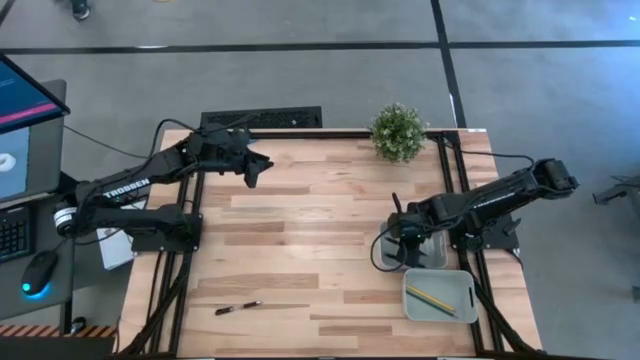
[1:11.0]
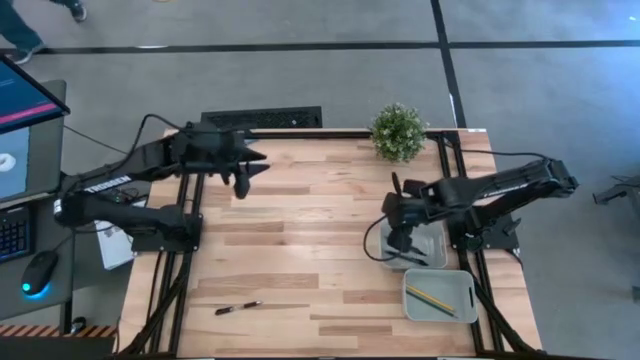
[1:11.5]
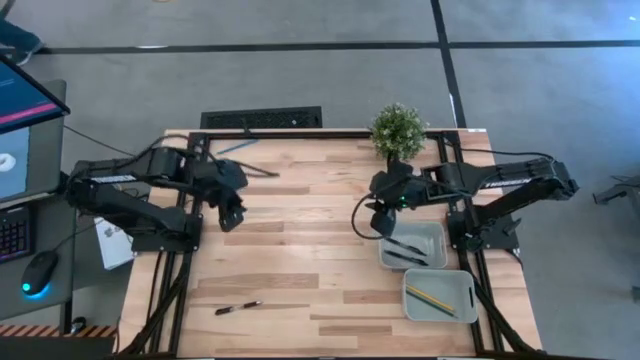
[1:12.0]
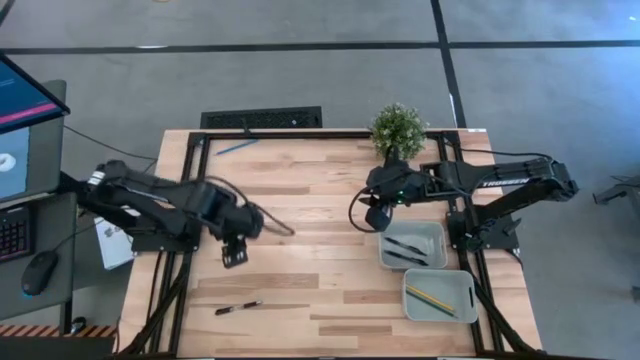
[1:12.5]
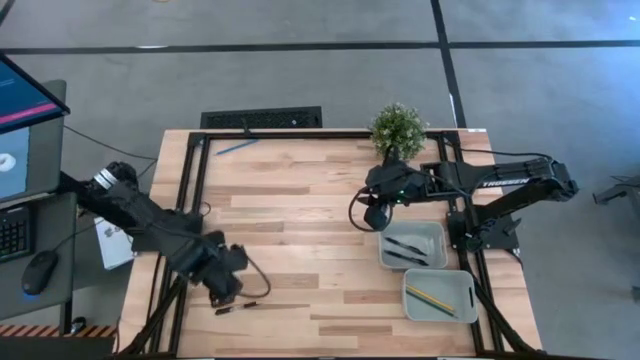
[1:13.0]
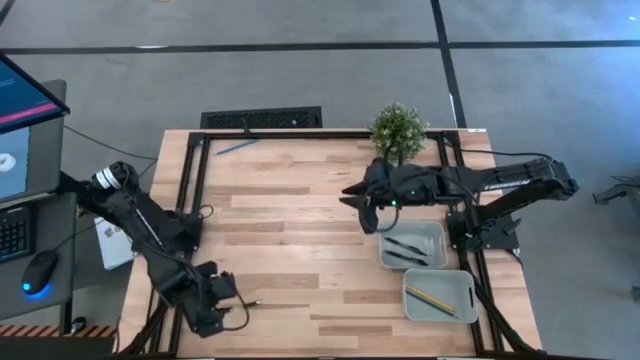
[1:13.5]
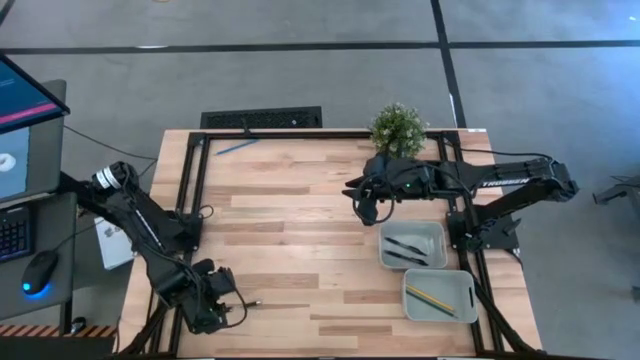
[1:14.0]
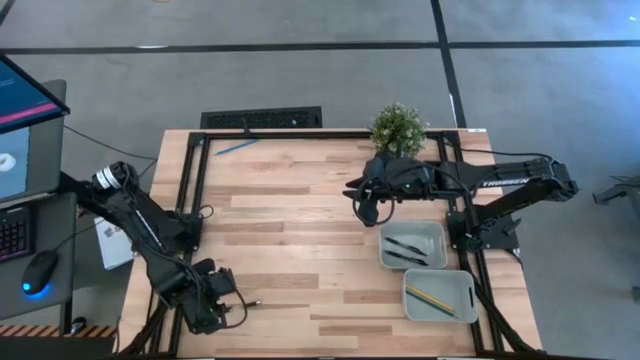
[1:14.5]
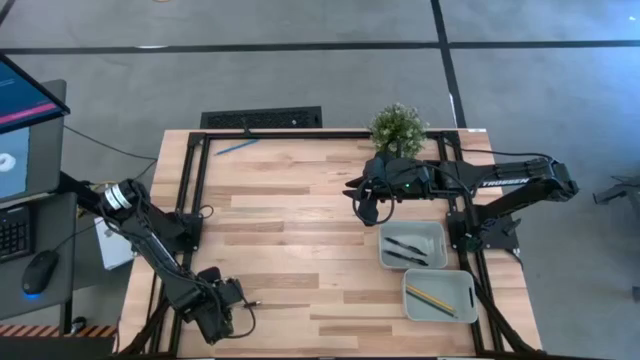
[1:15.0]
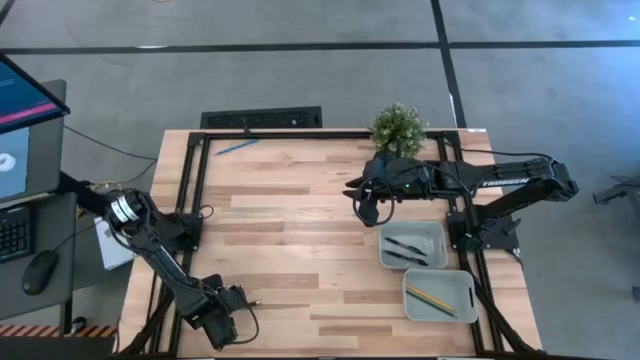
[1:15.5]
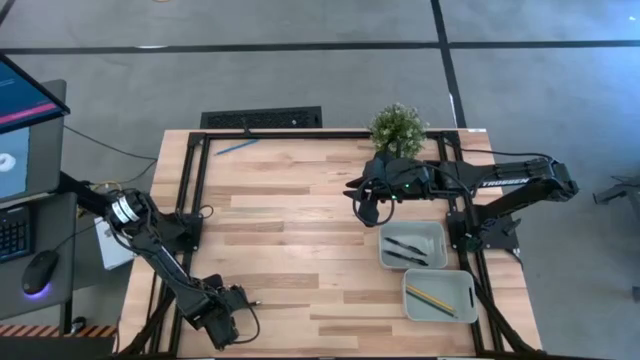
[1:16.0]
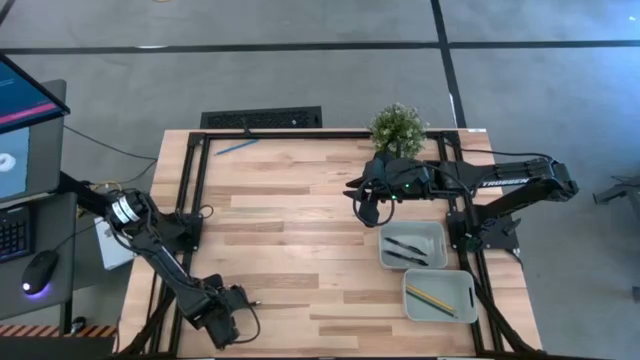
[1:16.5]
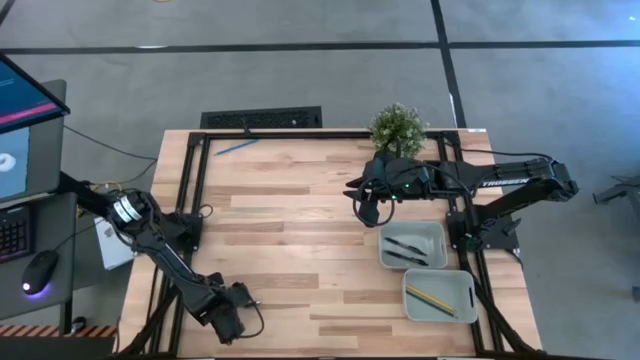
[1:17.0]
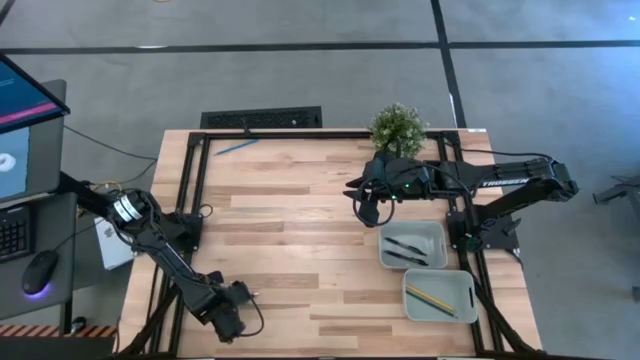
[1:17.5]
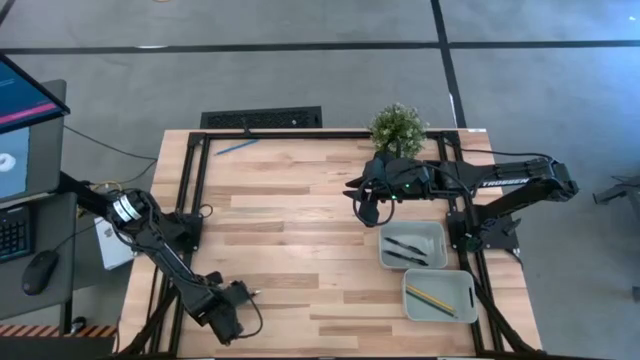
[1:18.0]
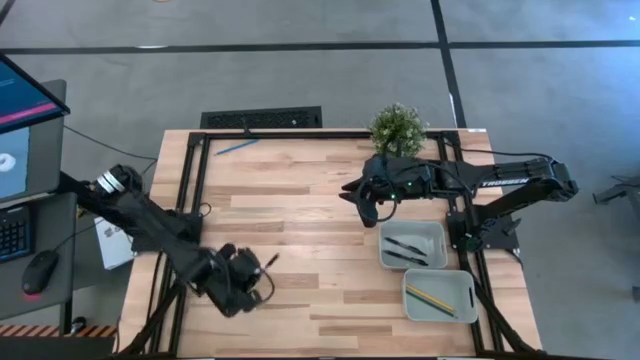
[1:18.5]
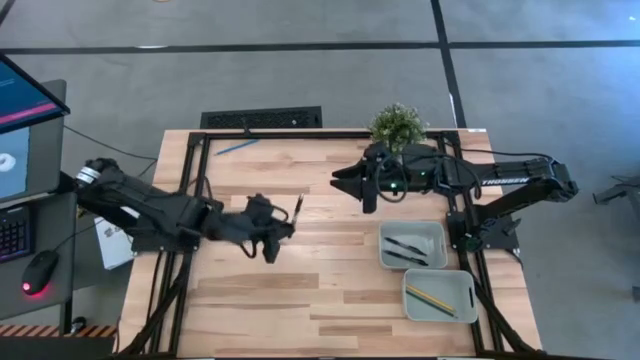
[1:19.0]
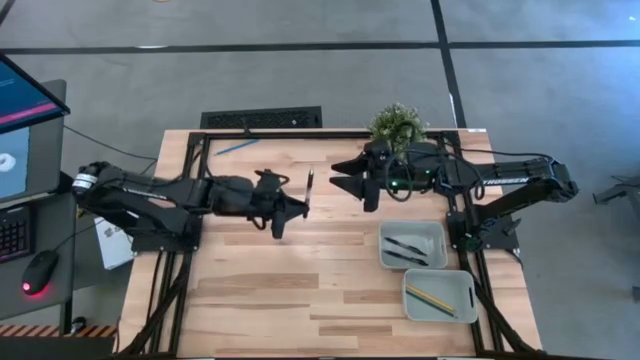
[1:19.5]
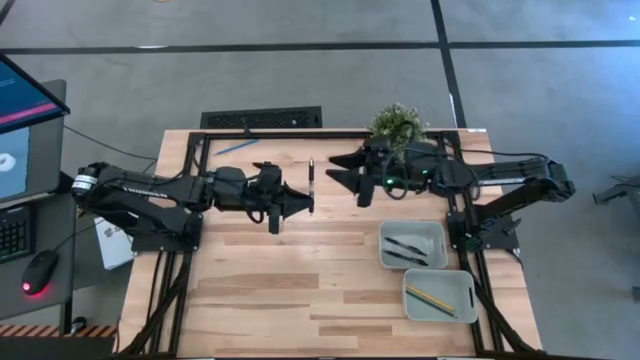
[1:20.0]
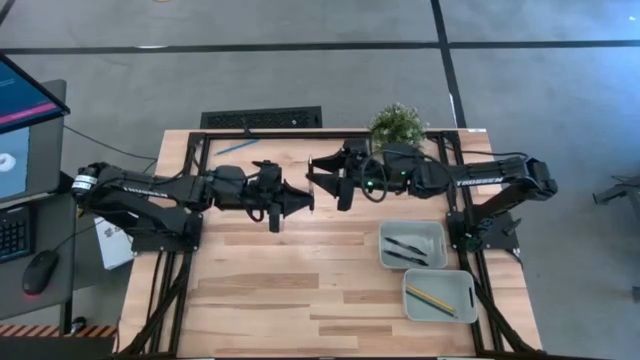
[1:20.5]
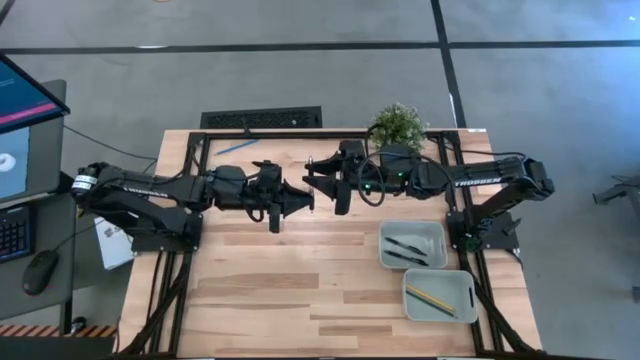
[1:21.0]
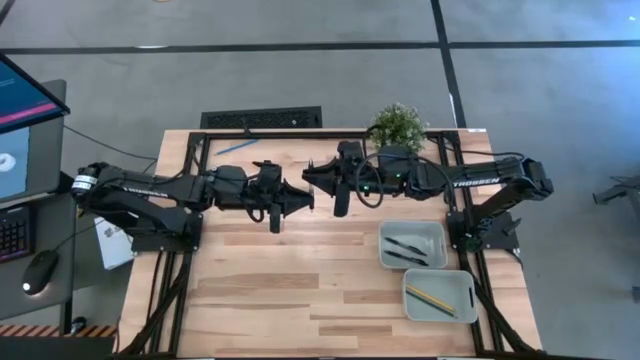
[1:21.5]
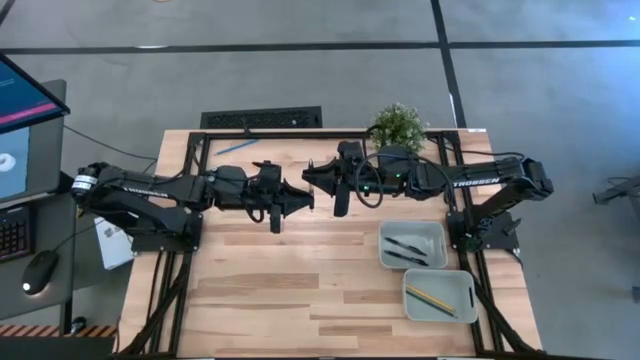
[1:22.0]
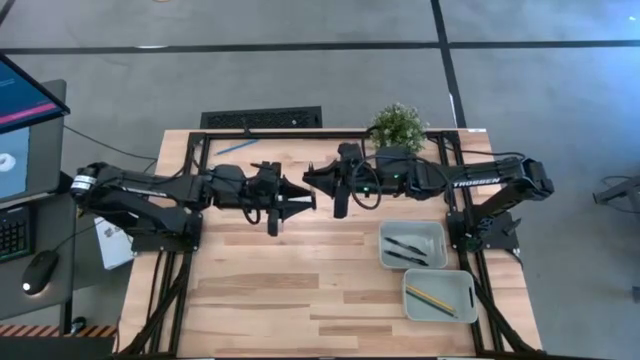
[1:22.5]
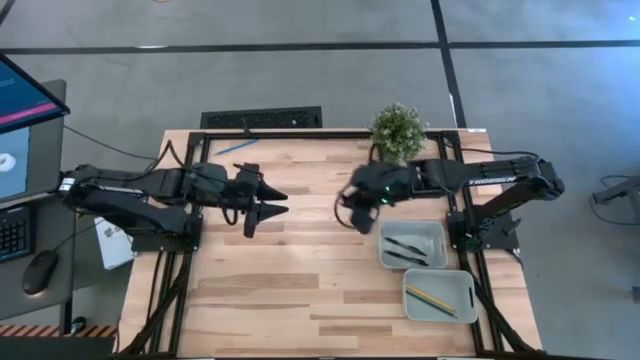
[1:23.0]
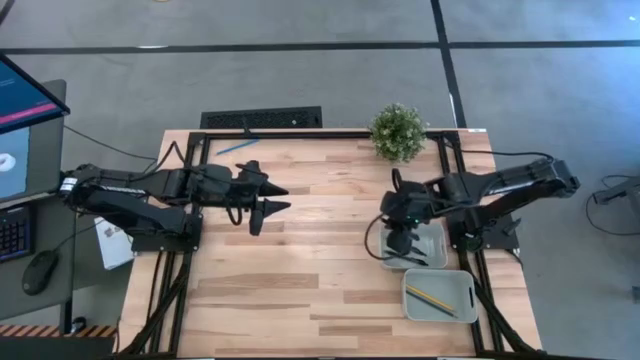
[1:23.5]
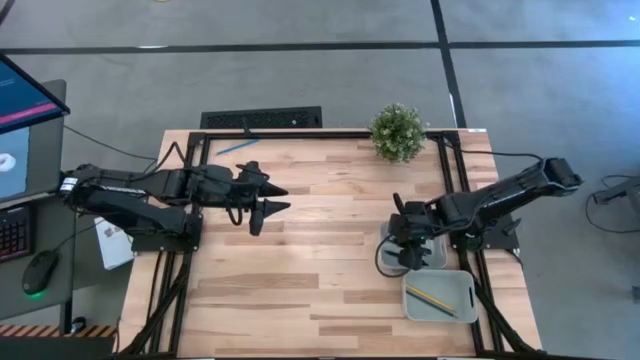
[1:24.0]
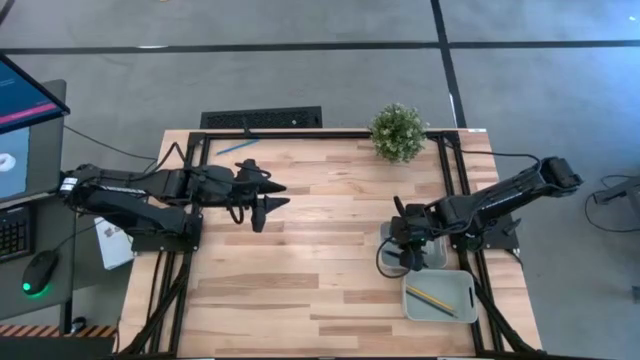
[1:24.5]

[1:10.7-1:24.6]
Task: Sort pens & pencils
Put the black pen into the top gray bin

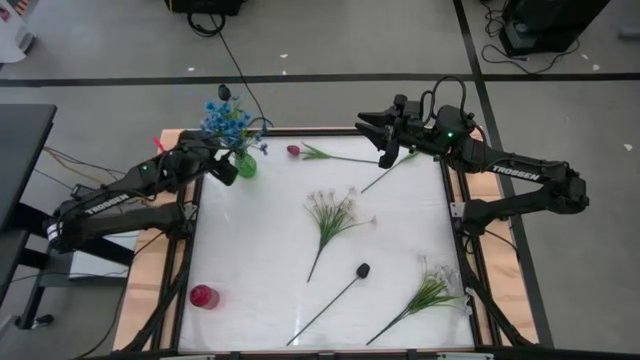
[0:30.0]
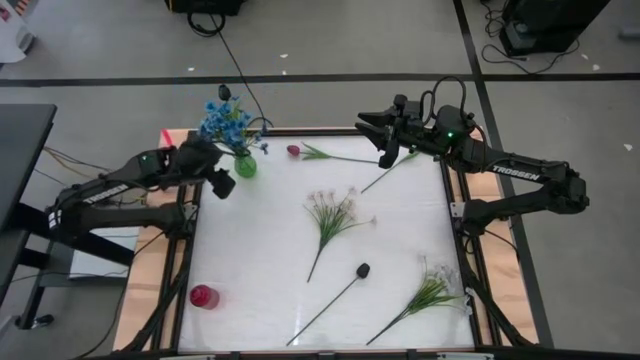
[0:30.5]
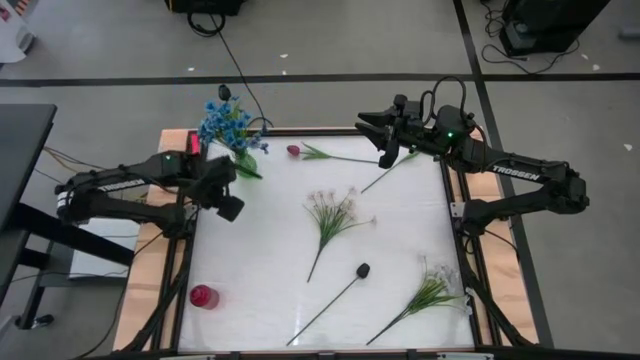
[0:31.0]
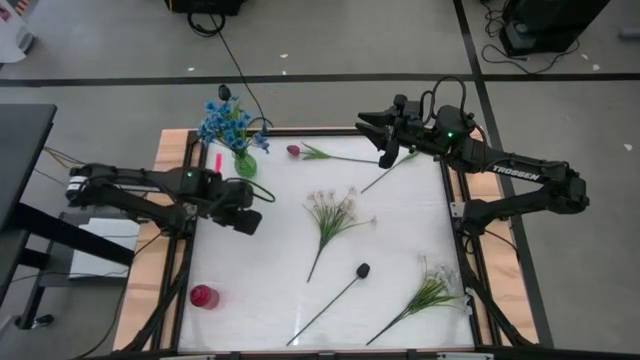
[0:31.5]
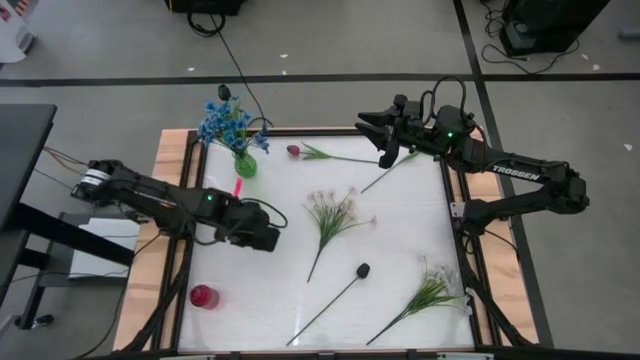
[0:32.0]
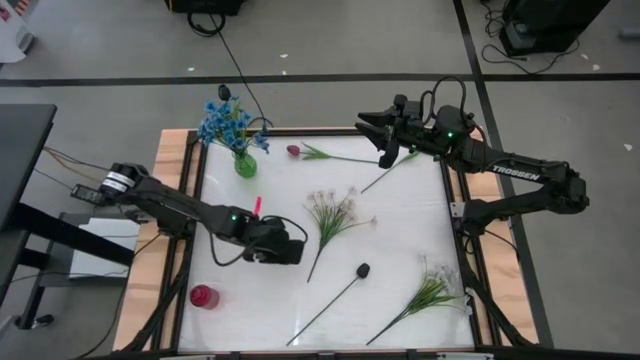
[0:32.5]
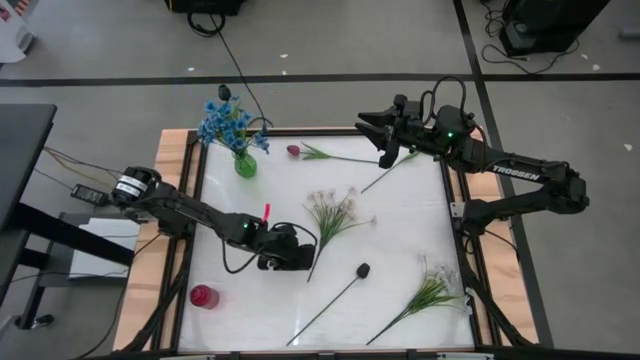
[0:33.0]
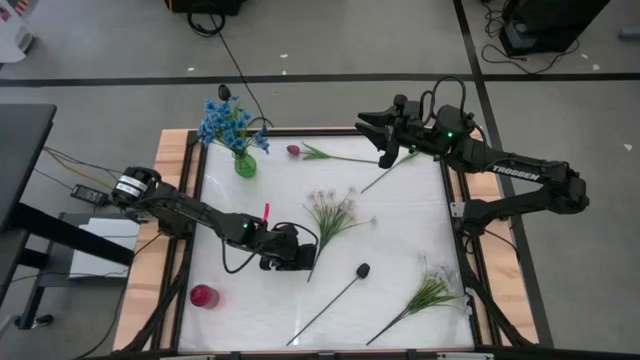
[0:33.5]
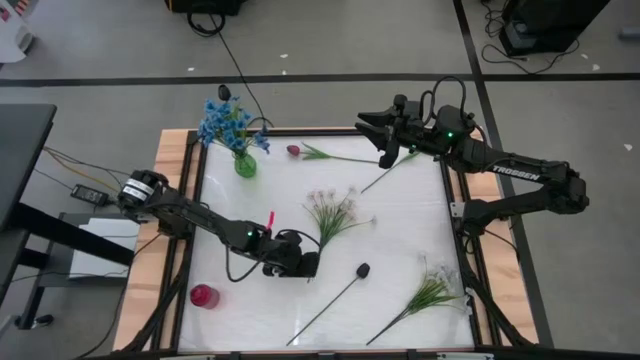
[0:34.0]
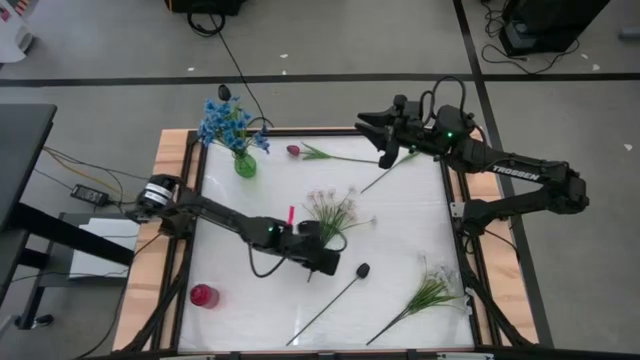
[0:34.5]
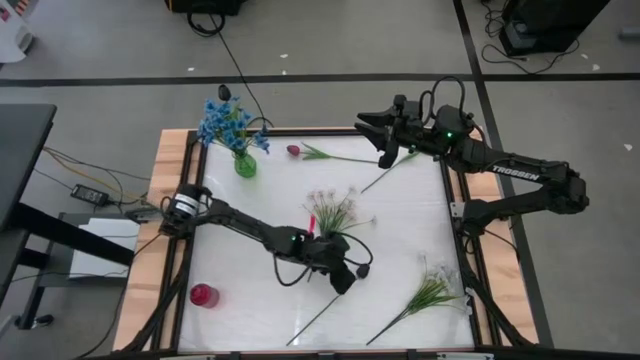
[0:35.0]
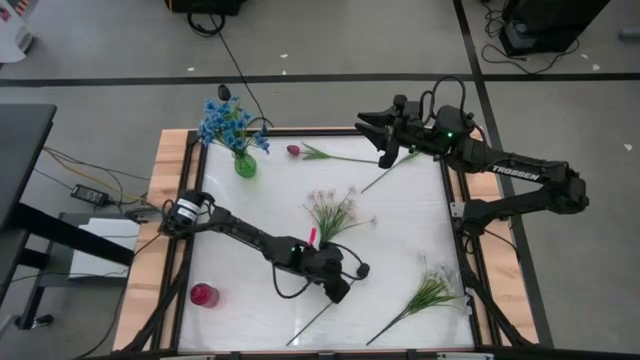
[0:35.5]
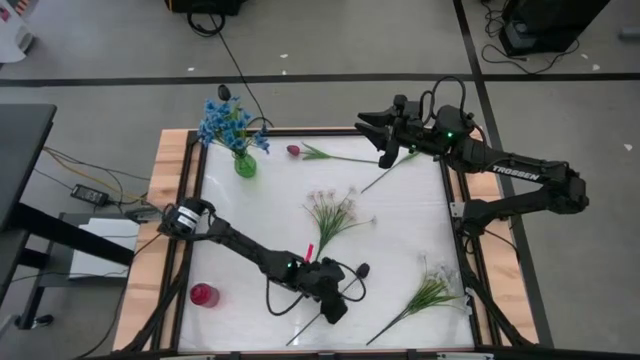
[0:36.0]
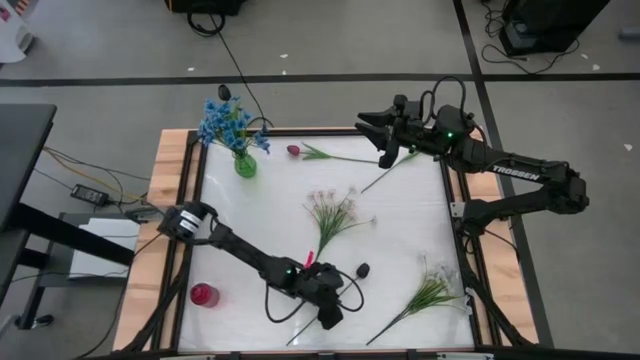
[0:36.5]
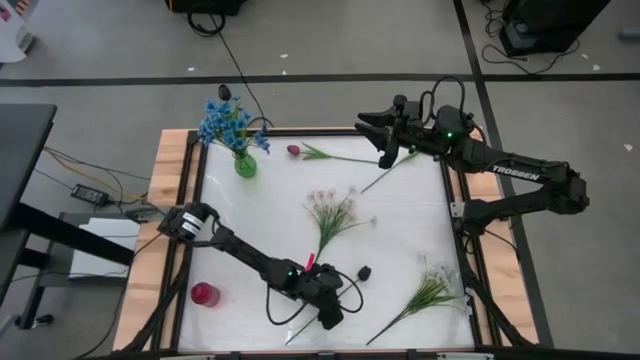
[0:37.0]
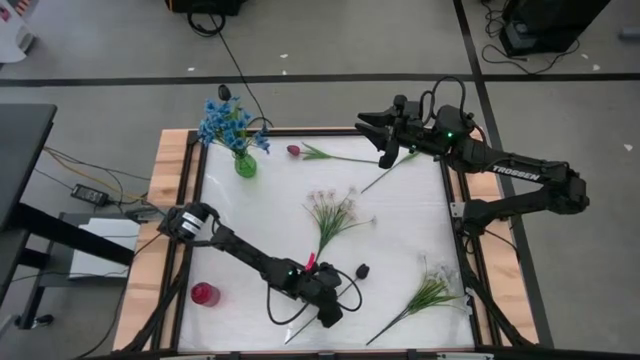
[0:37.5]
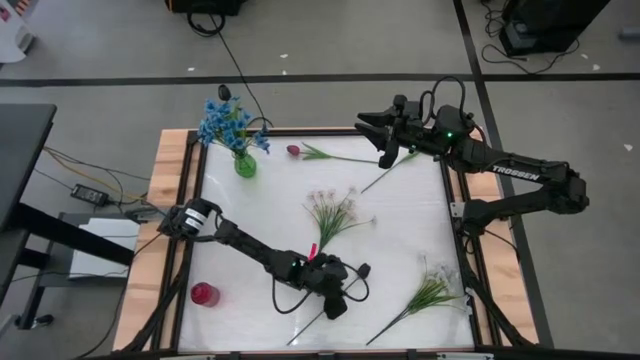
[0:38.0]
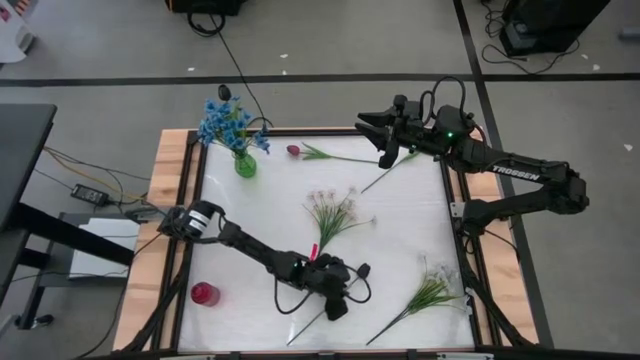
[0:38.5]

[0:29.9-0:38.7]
Task: Sort flowers into vase by color
Put the black tulip into the green vase
